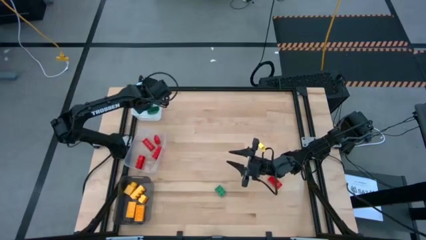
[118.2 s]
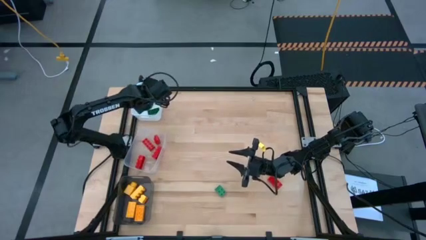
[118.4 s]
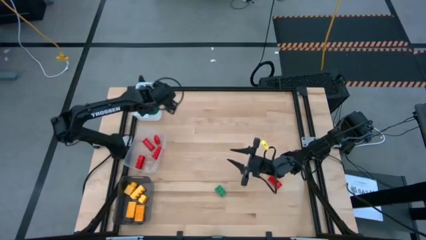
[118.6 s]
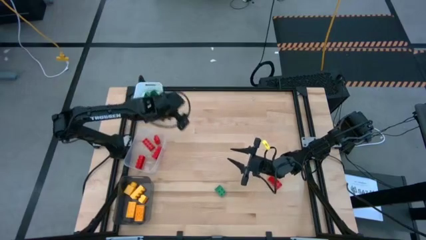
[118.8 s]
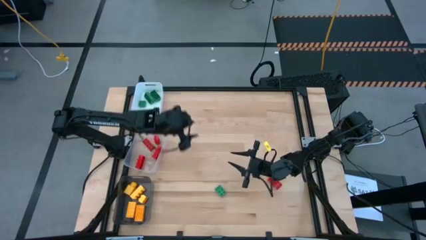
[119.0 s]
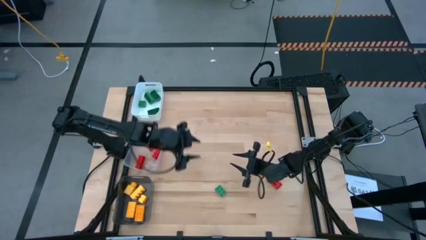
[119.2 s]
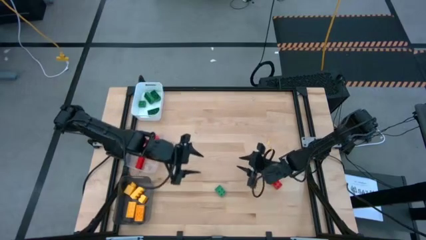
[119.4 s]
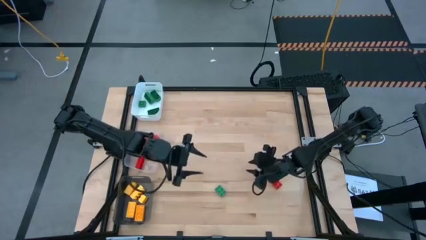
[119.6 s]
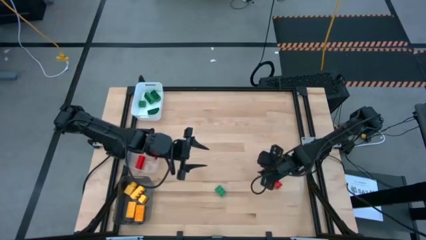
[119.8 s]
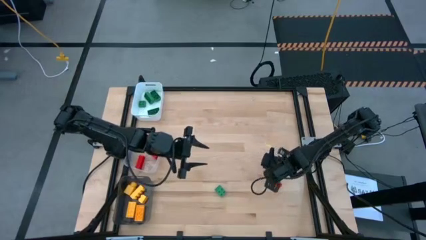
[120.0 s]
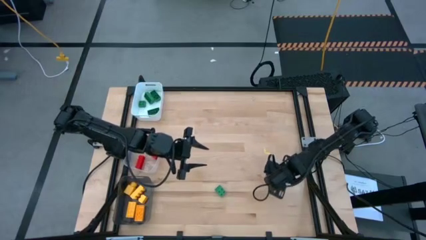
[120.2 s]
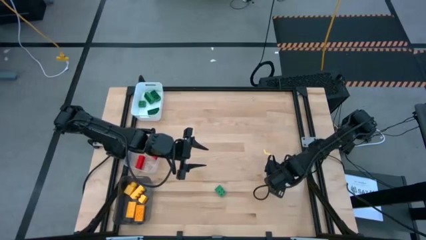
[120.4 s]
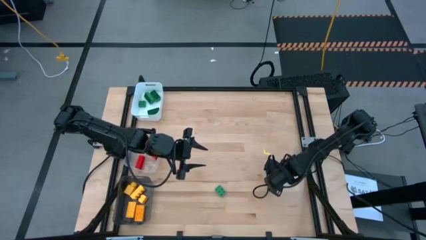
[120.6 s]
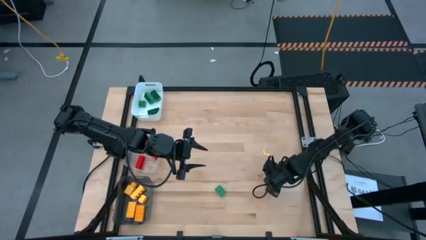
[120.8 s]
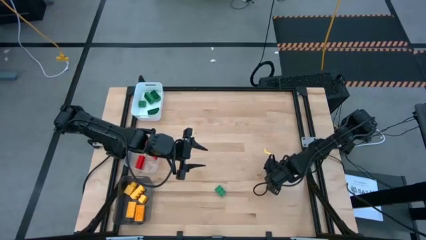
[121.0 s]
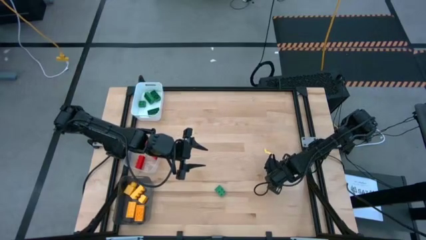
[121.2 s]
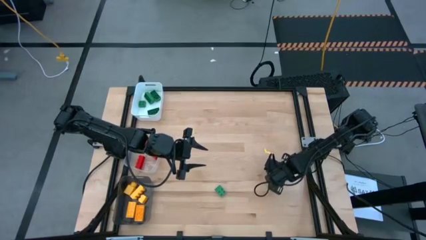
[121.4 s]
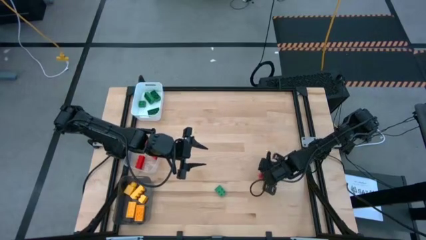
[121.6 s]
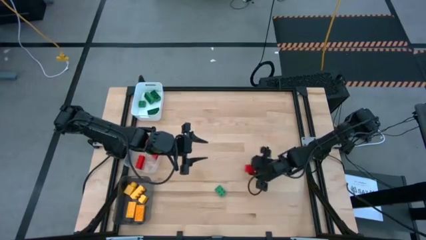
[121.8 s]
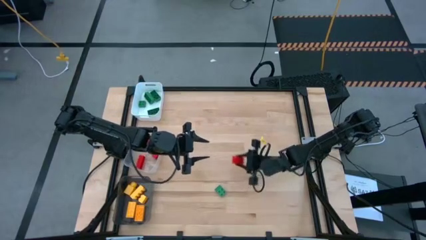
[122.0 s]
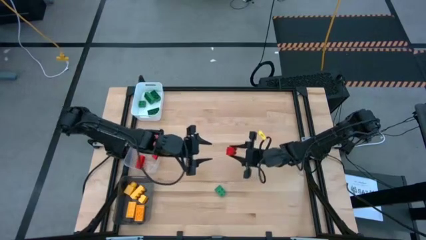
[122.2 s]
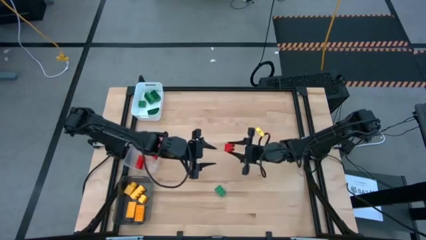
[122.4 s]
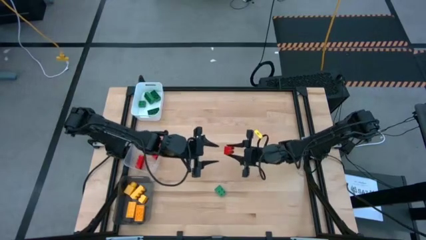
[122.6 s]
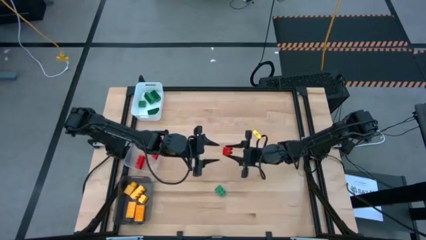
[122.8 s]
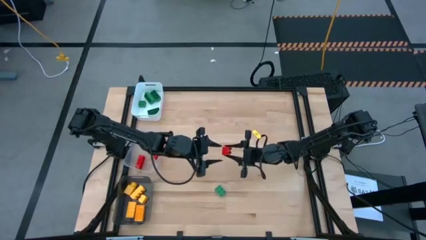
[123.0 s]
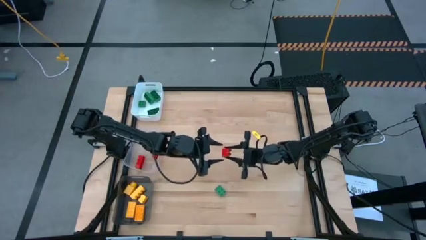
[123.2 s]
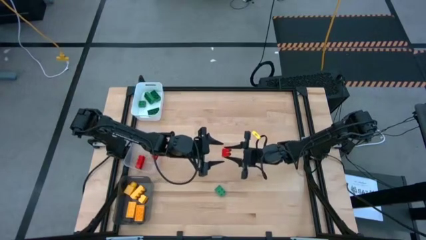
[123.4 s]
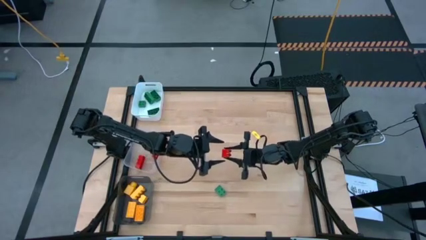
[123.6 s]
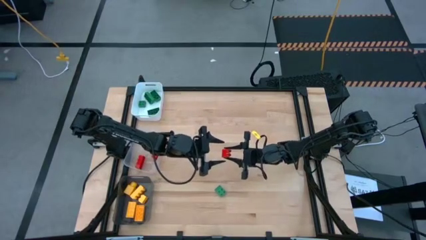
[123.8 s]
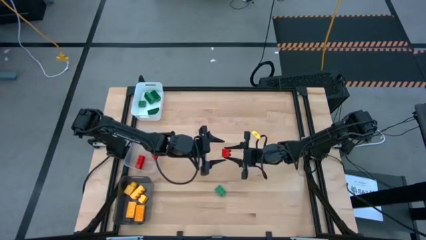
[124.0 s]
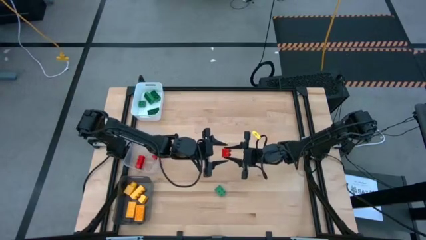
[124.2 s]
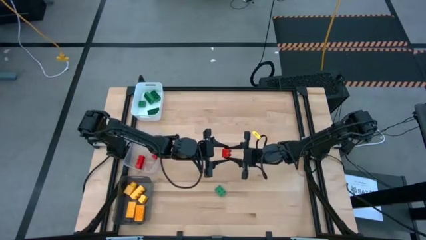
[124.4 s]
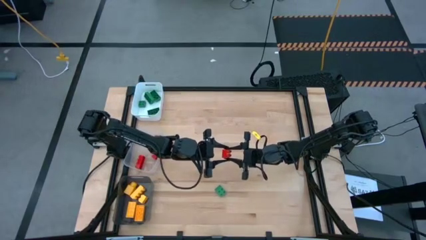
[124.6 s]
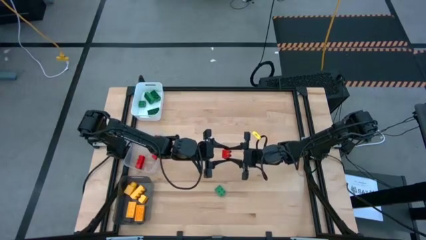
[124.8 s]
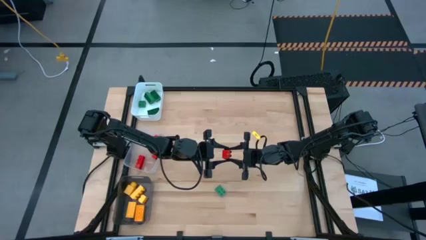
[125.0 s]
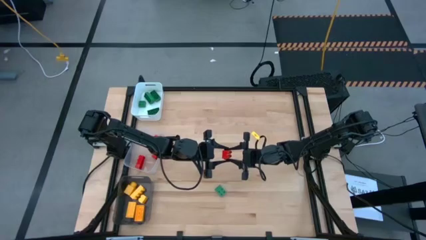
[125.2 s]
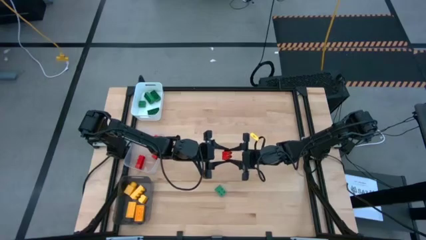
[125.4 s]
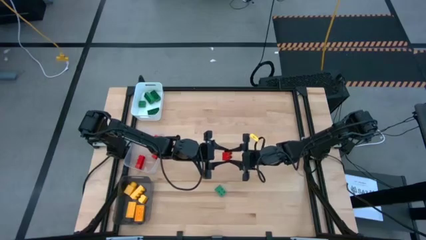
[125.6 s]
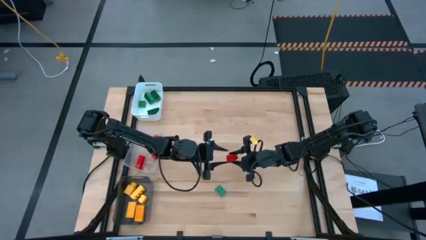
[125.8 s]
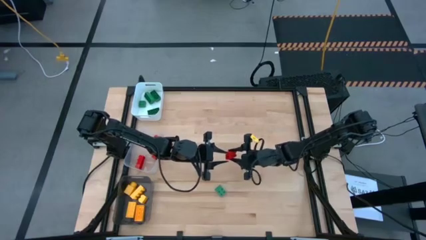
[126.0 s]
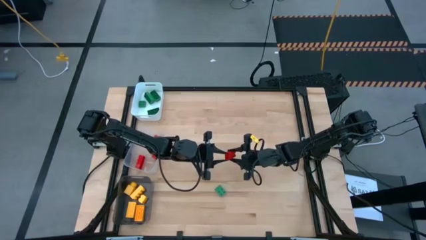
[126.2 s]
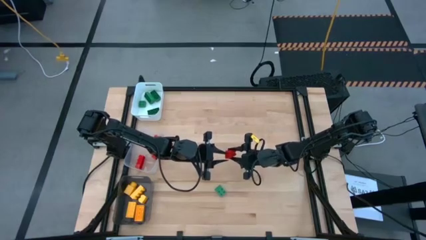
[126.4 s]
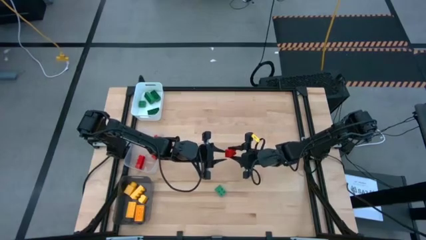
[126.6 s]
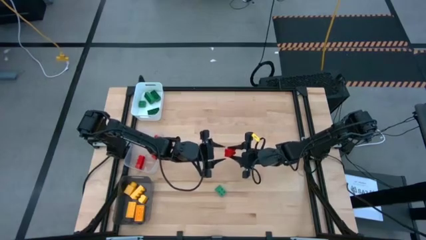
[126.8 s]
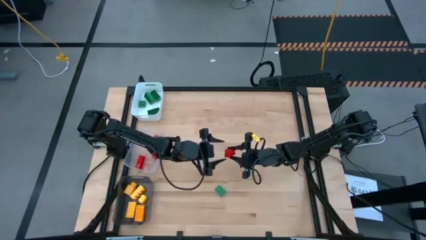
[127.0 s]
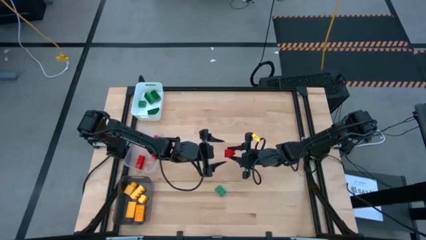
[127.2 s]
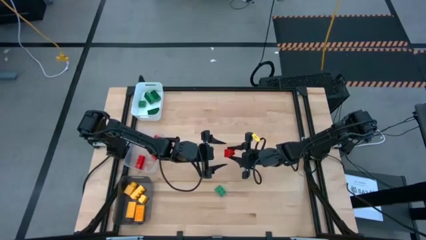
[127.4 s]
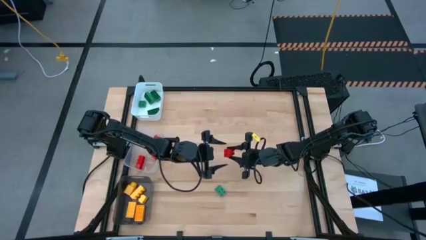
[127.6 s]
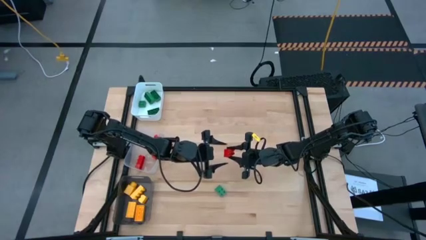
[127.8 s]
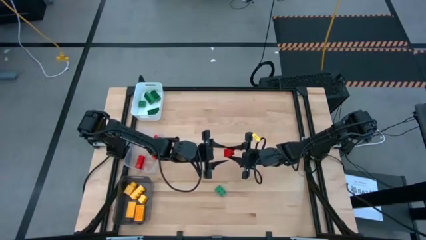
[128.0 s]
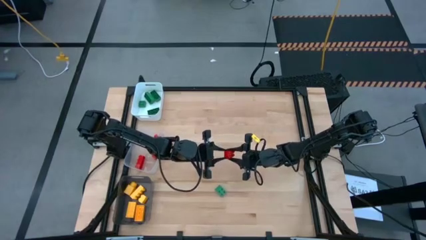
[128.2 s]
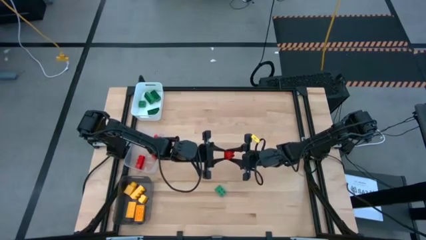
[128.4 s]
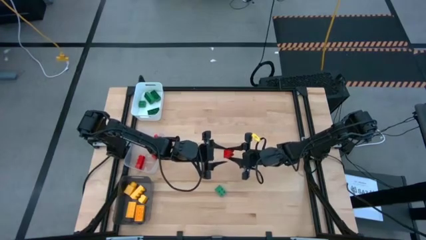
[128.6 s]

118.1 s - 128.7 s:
Task: Sort & place blocks by color
Put the red game piece into the transparent bin

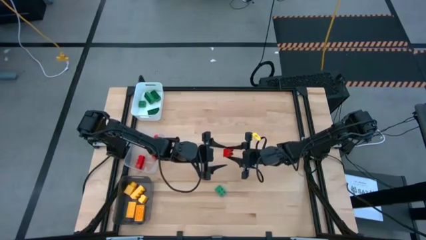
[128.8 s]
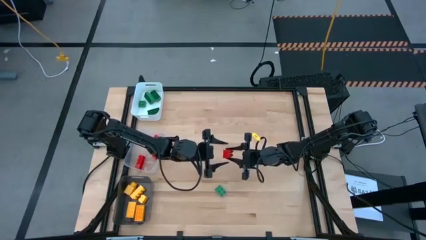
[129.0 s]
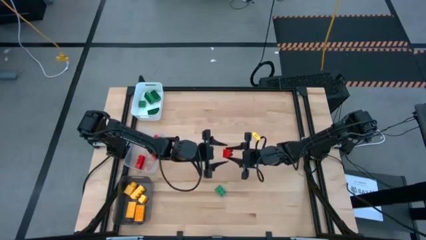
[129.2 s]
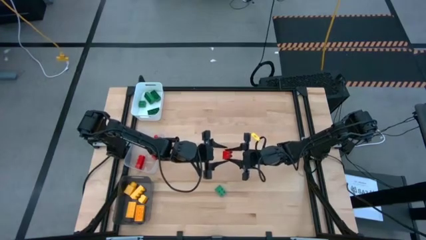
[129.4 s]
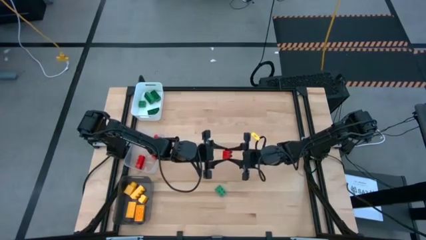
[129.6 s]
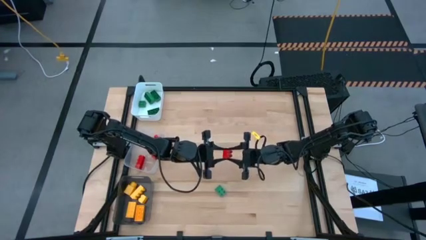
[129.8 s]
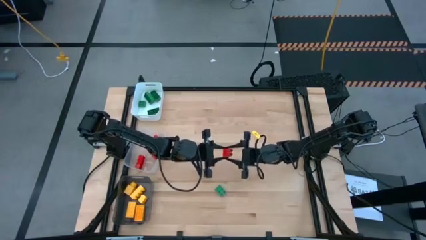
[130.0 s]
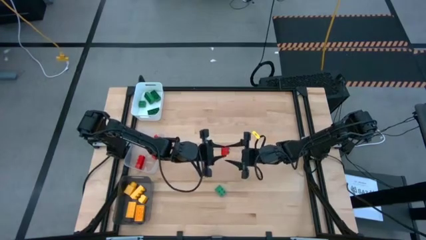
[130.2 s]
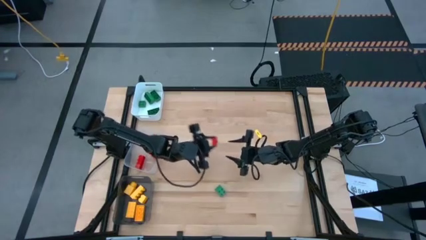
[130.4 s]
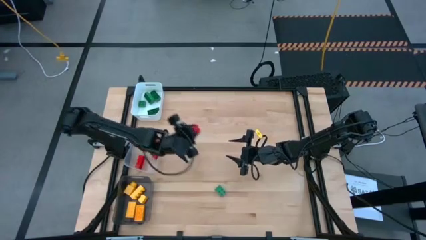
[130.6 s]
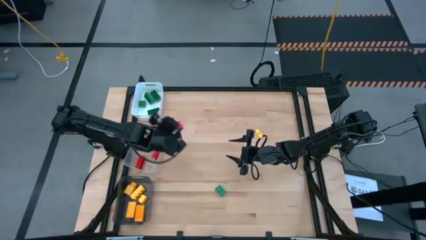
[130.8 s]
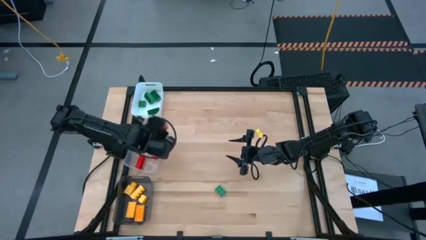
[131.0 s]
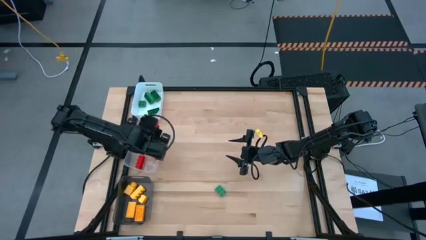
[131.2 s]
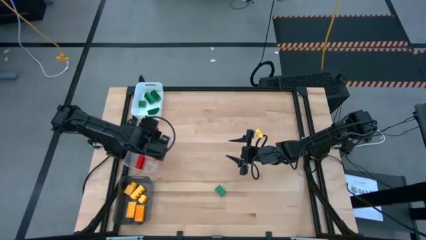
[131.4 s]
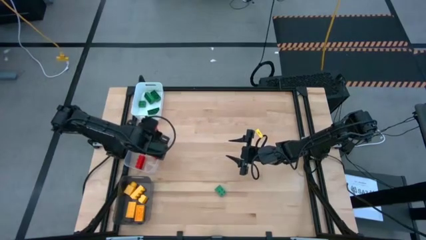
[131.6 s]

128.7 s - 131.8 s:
Put the red game piece into the transparent bin

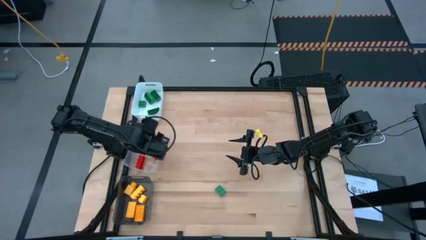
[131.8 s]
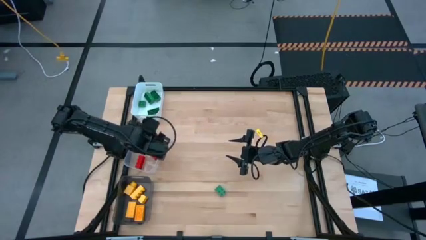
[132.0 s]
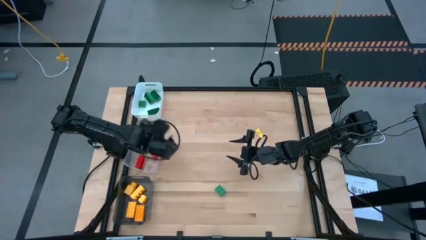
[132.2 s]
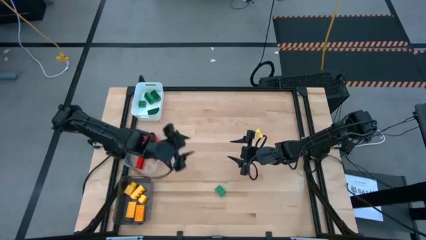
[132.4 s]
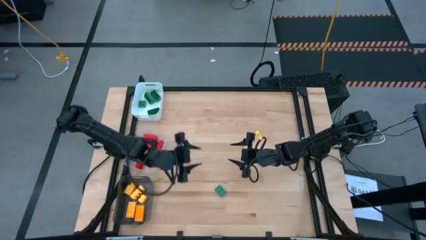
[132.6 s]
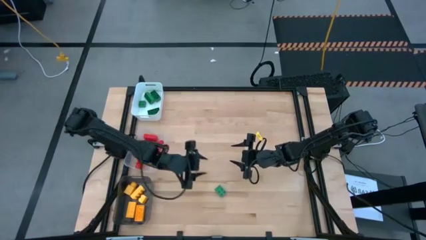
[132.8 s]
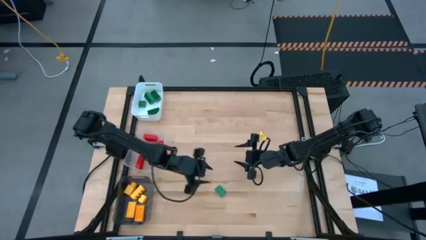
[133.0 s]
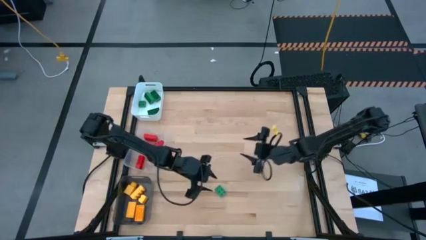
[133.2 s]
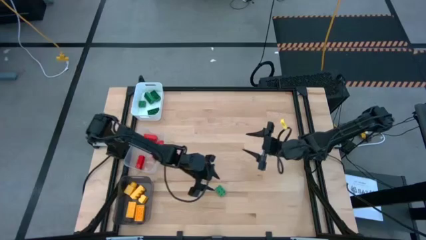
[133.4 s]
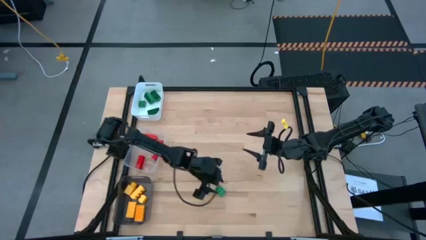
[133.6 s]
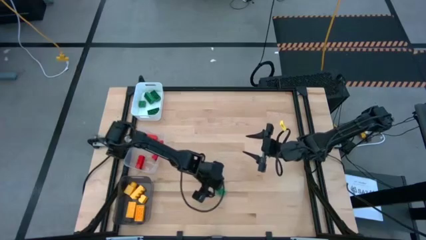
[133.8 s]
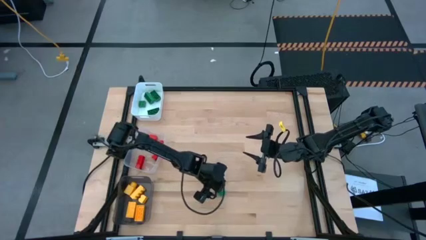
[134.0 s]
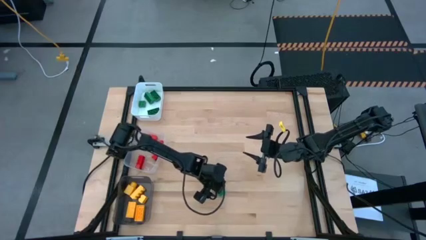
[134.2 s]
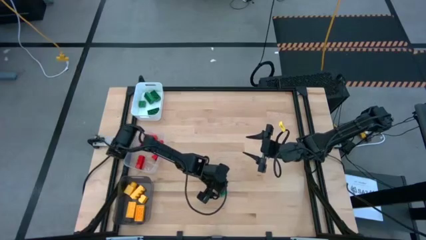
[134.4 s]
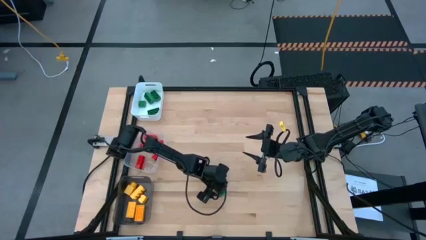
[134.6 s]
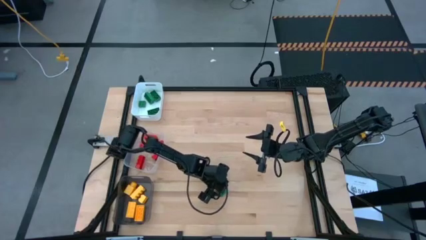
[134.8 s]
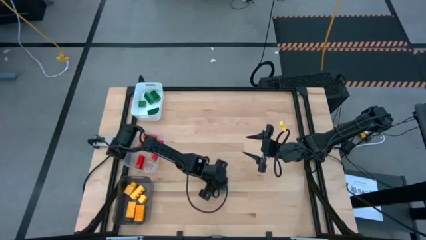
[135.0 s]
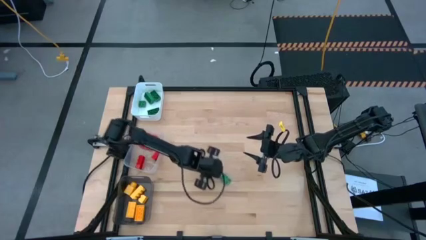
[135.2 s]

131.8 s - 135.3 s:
Put the green game piece into the white bin
